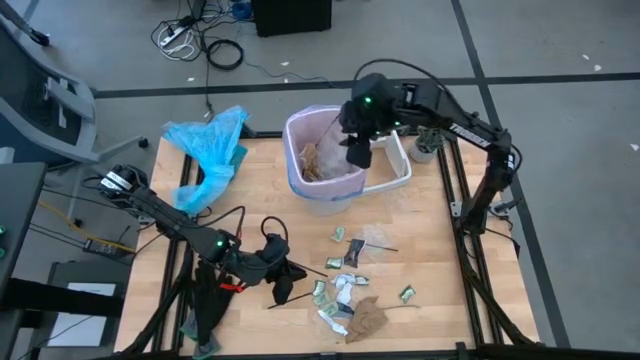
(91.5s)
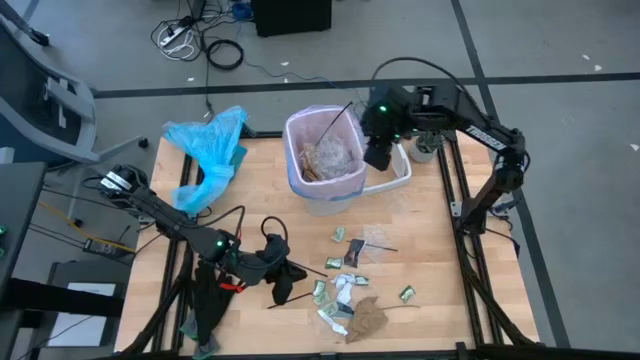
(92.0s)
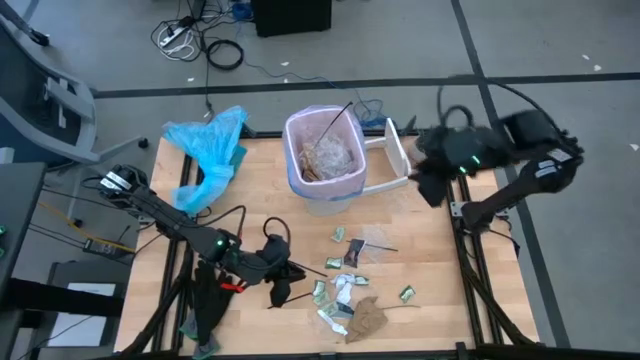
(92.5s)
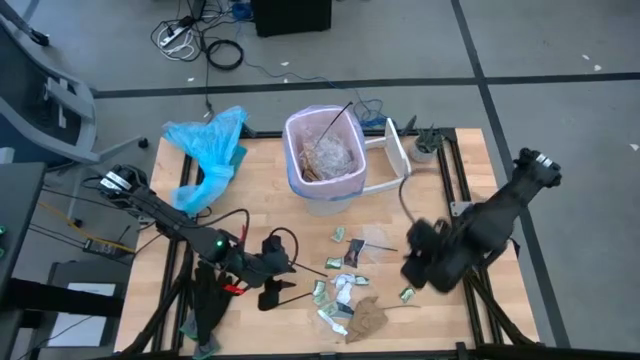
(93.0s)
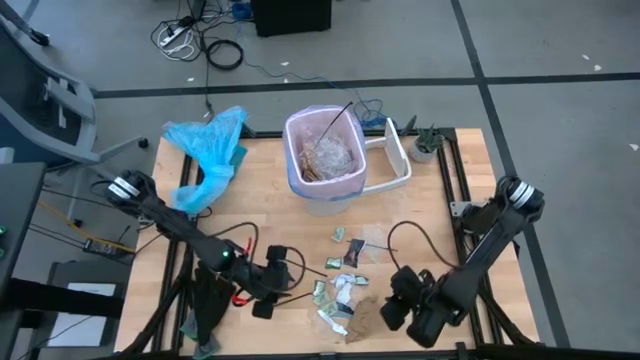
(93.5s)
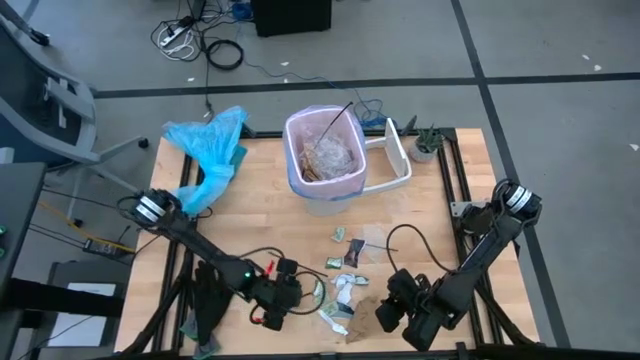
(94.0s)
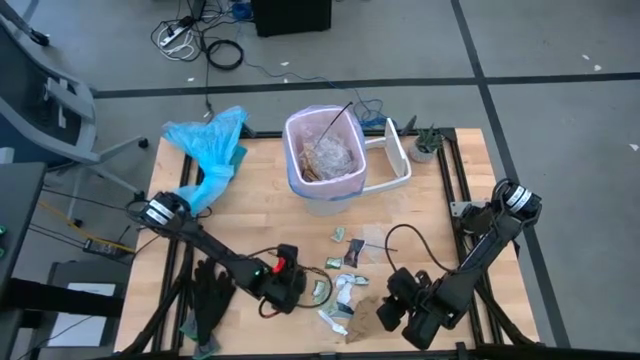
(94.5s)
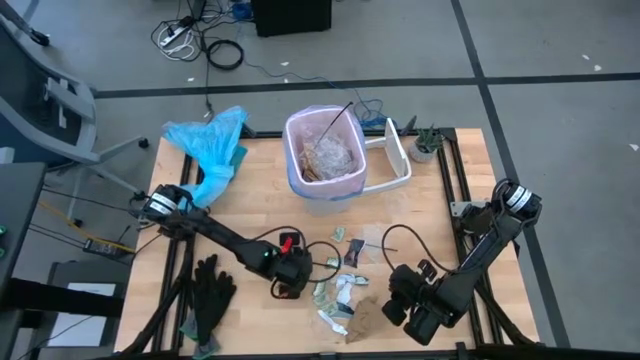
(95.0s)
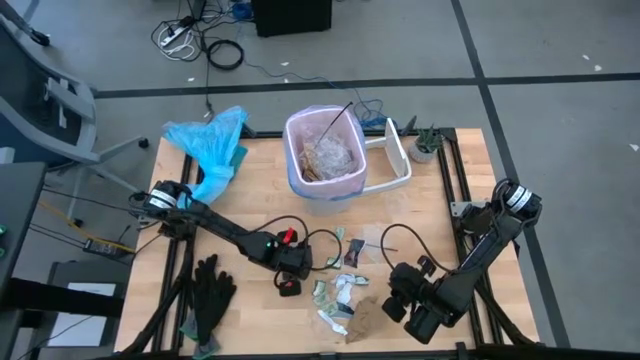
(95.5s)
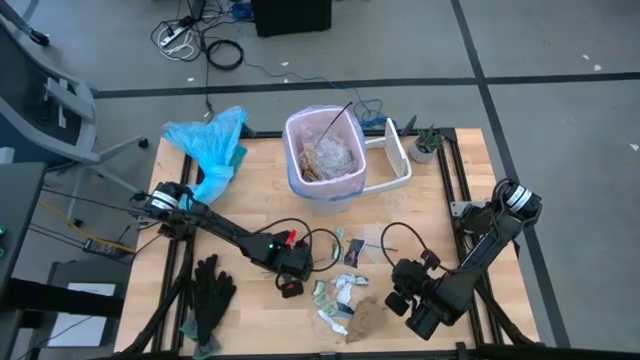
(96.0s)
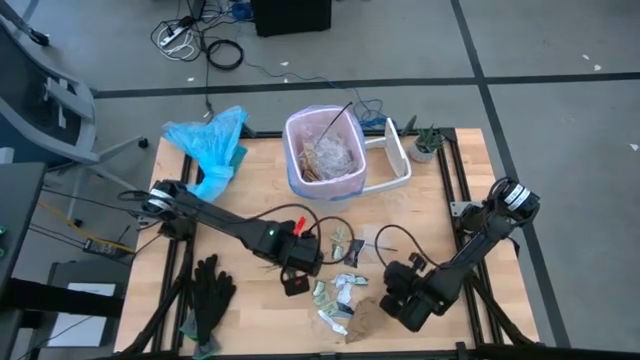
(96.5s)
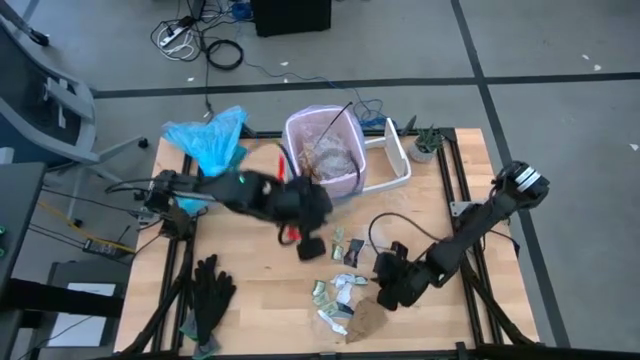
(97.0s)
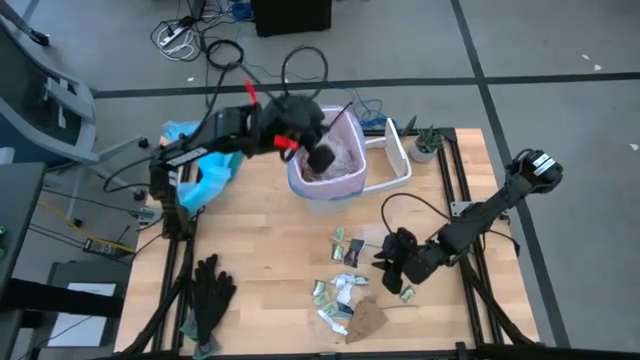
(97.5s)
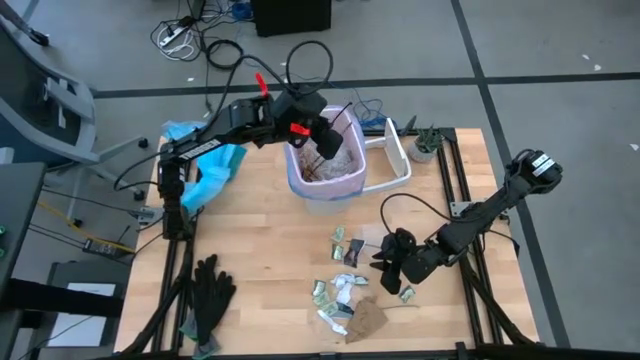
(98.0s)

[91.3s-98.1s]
Task: place trash/remove bag and relplace
Put the bottom left black cable tie and middle left black cable tie into the trash bin

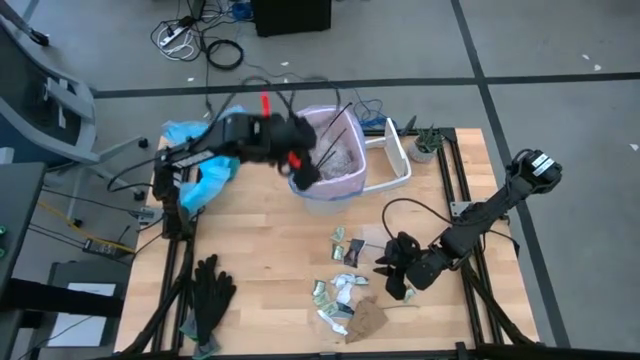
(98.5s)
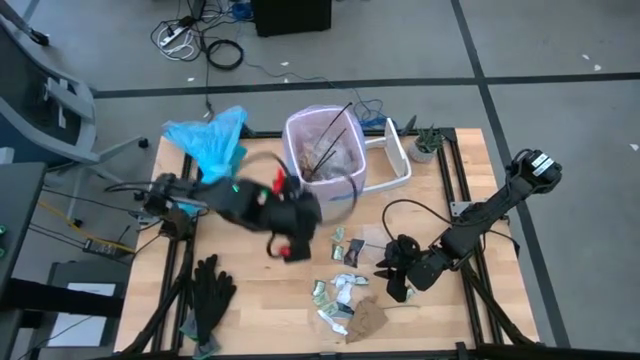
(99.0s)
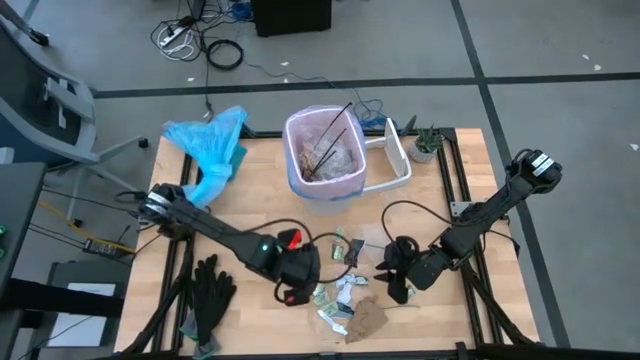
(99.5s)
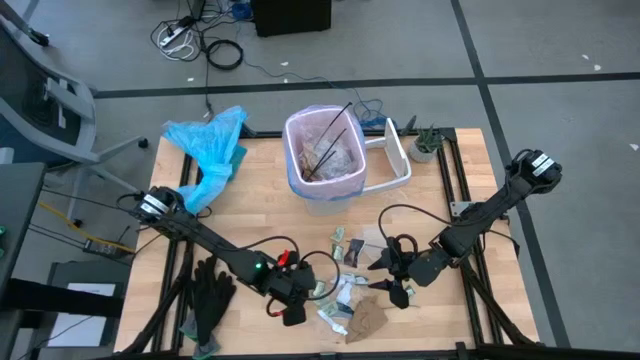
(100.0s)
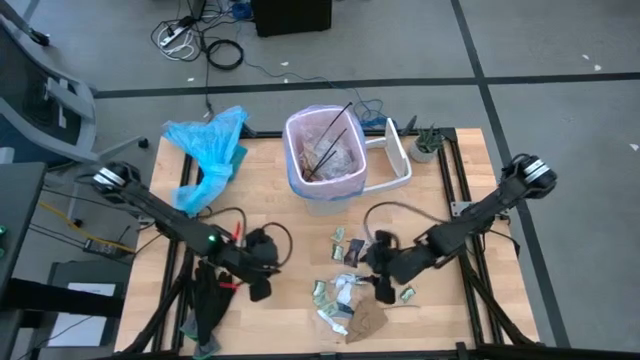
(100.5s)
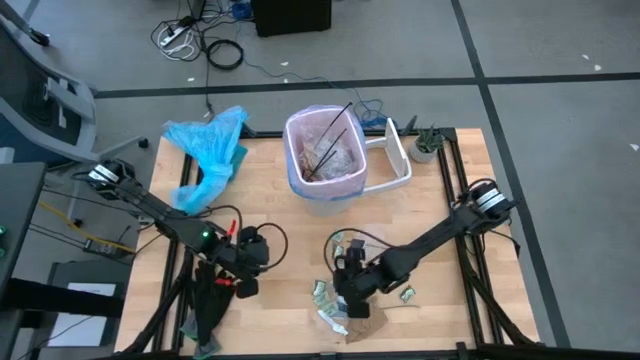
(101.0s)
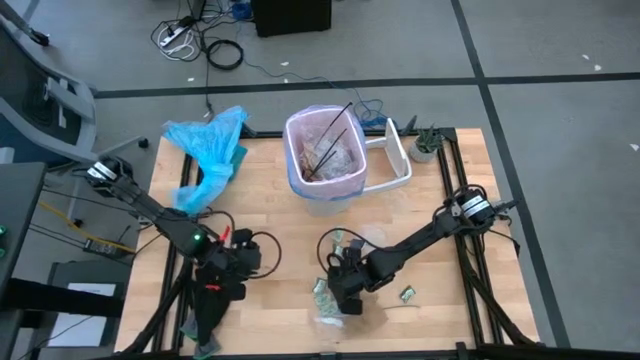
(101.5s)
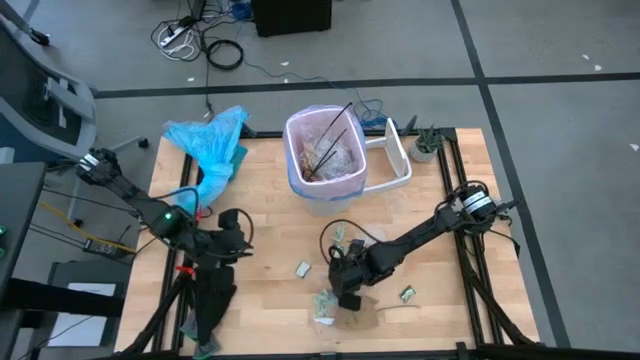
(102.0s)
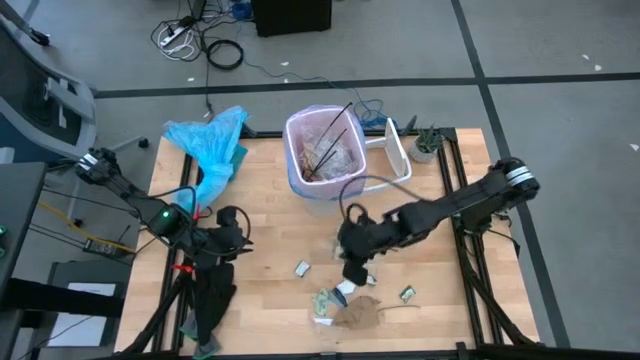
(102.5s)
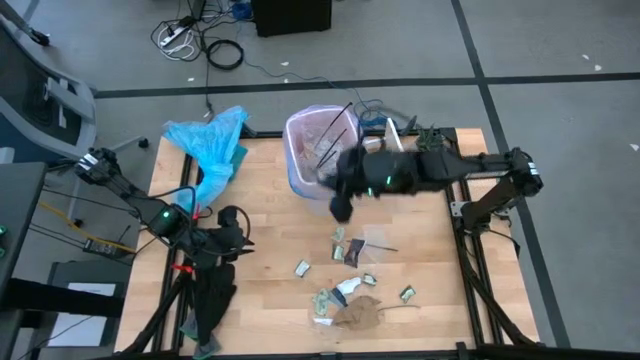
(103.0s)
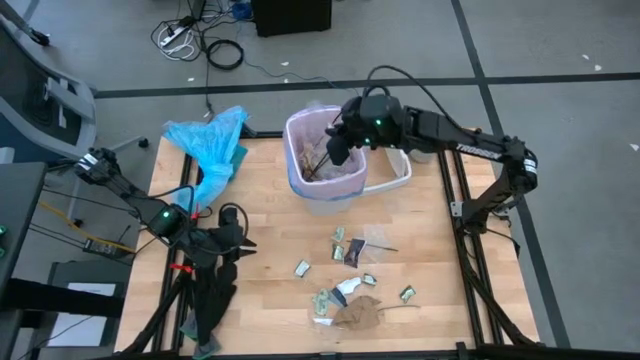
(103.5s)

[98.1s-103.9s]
Put the clear cellophane and white paper into the trash bin

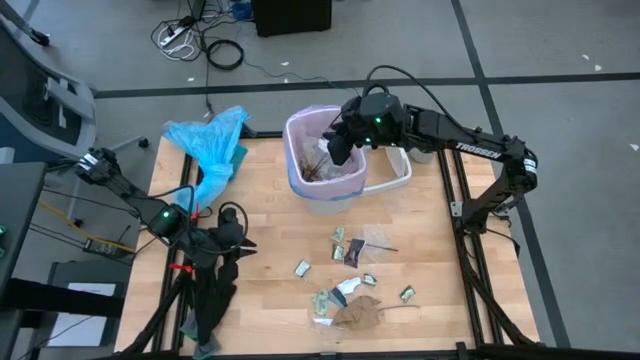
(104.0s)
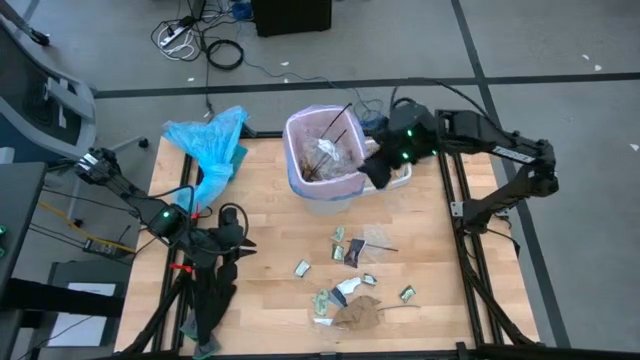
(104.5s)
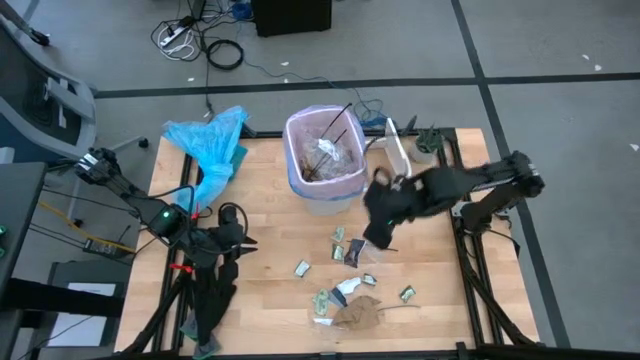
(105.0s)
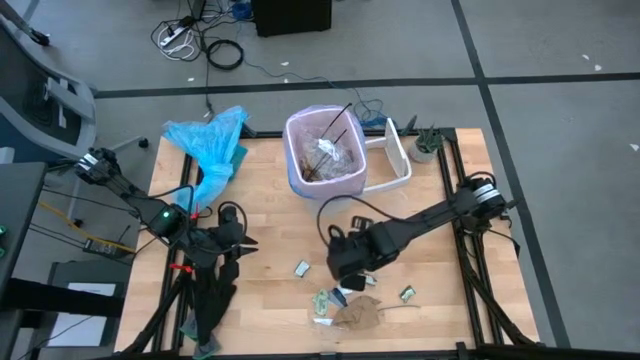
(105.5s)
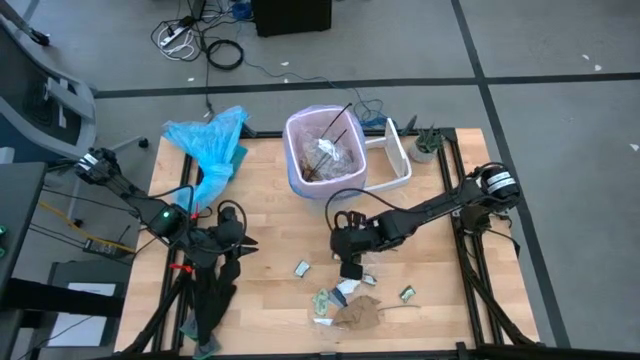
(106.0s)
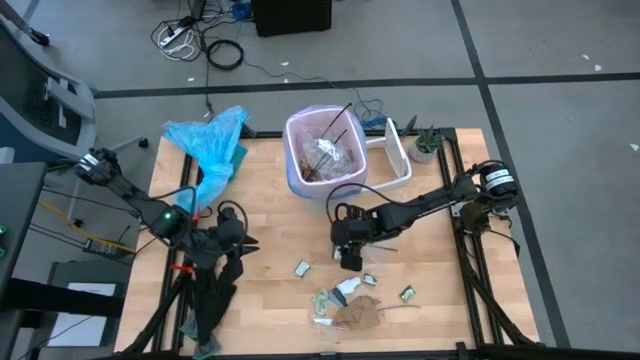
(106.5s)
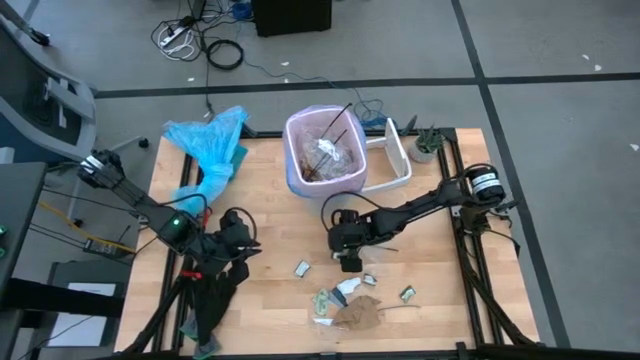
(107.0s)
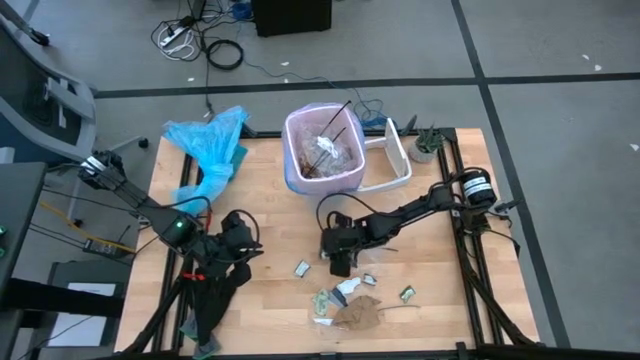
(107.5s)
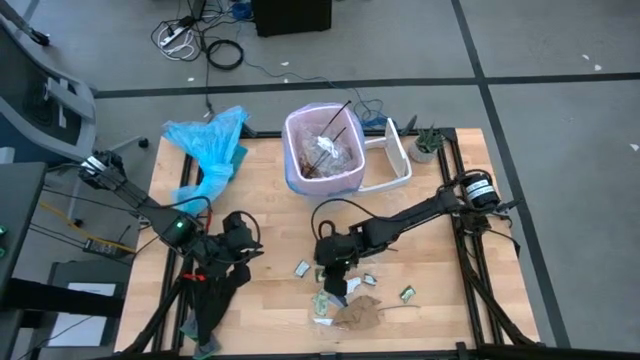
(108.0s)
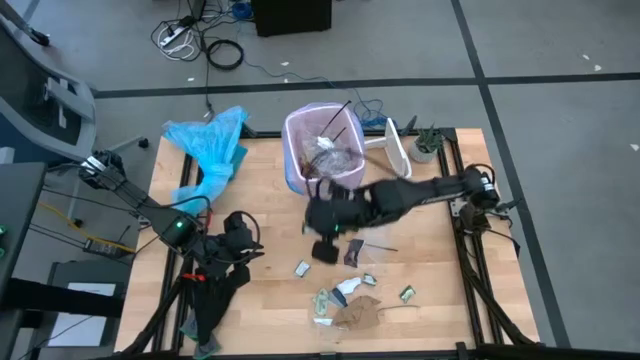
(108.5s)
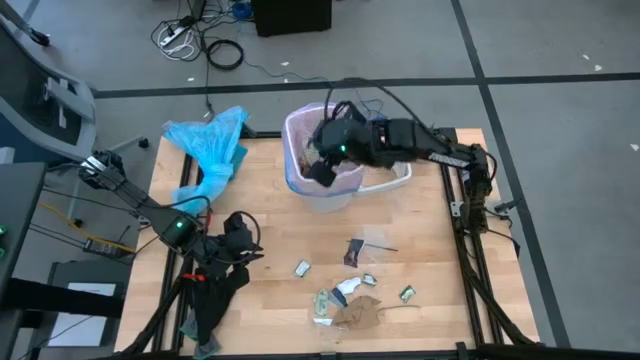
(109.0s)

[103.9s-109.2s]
Put the green plastic material and light green plastic material into the trash bin

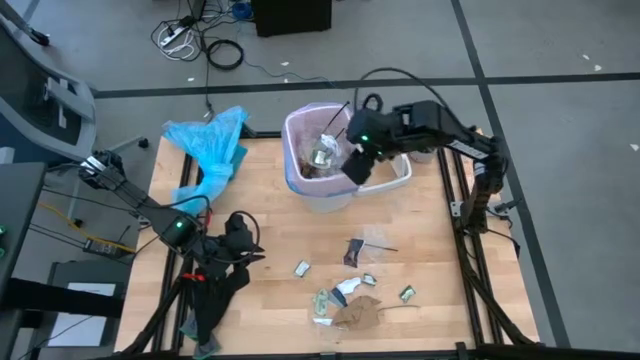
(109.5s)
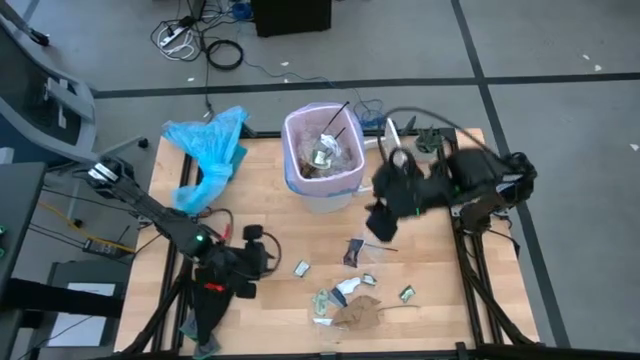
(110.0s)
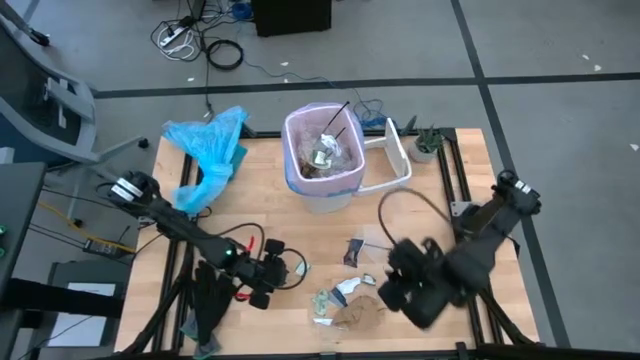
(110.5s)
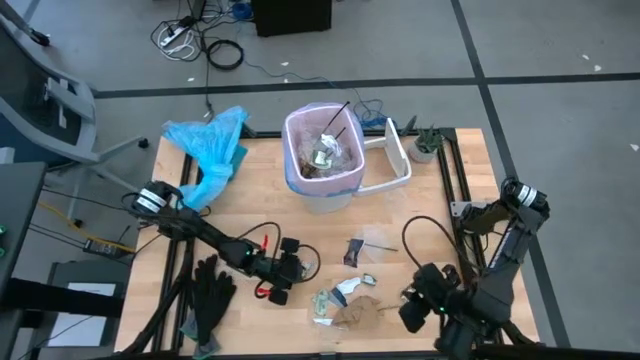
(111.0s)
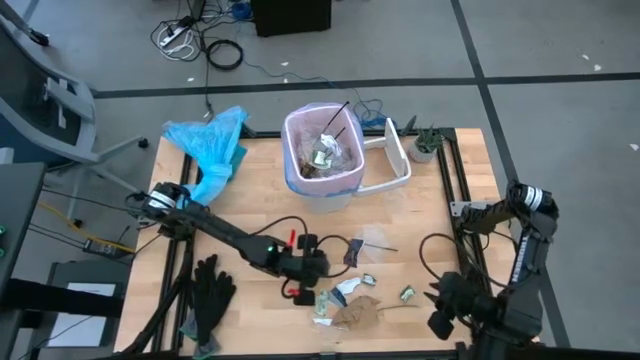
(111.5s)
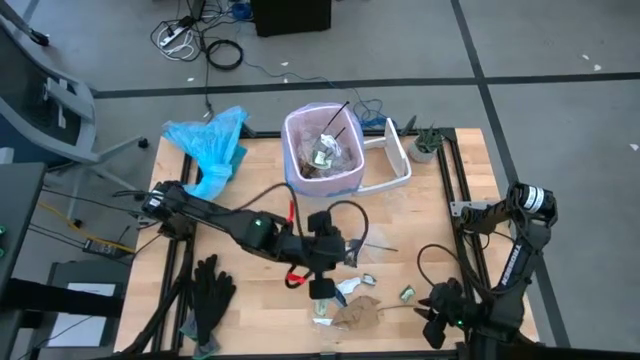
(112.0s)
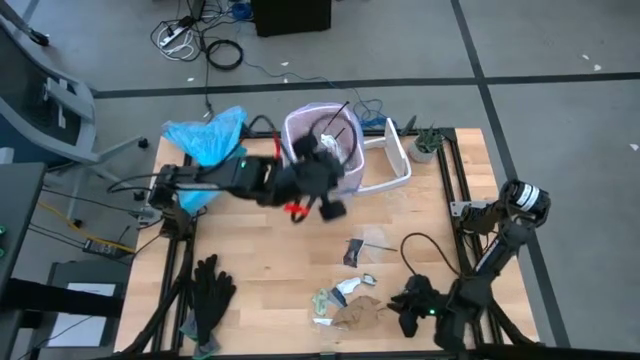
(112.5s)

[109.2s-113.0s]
Put the left green plastic material into the white trash bin
